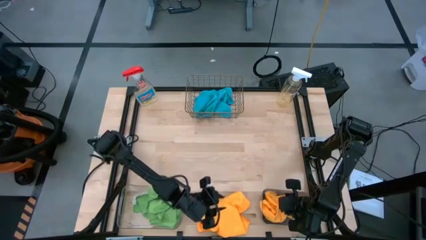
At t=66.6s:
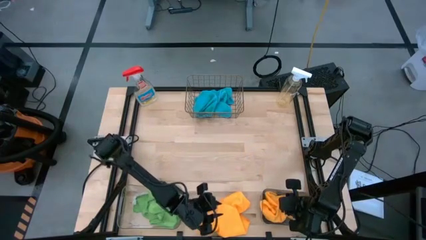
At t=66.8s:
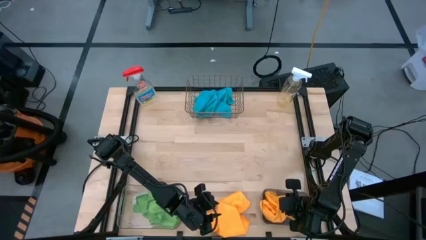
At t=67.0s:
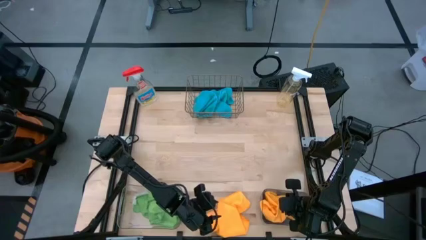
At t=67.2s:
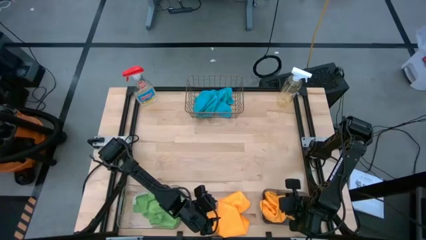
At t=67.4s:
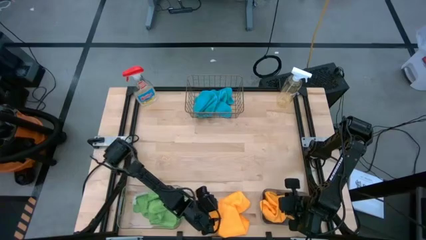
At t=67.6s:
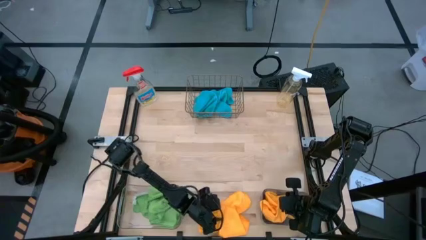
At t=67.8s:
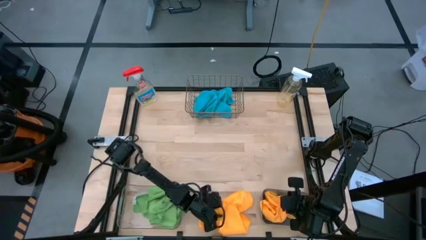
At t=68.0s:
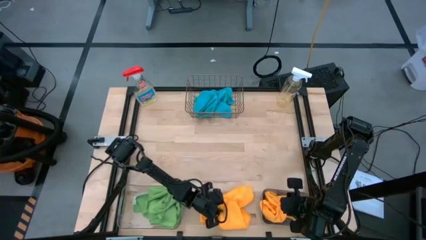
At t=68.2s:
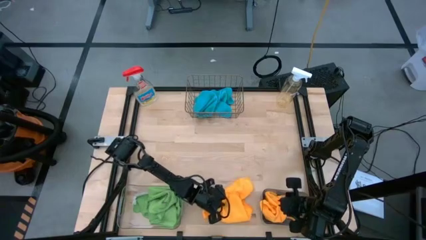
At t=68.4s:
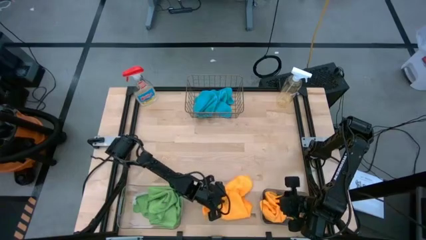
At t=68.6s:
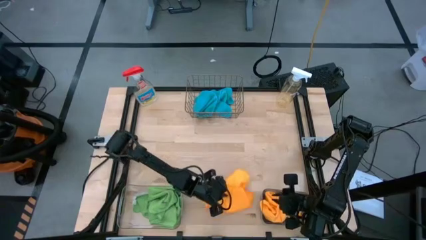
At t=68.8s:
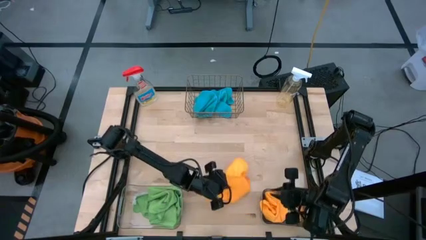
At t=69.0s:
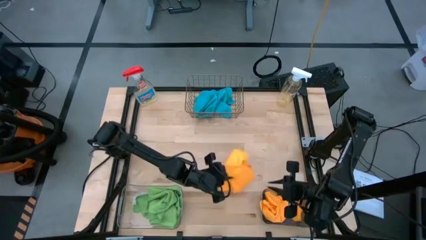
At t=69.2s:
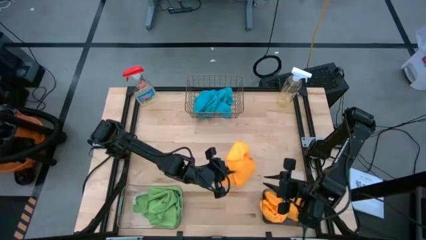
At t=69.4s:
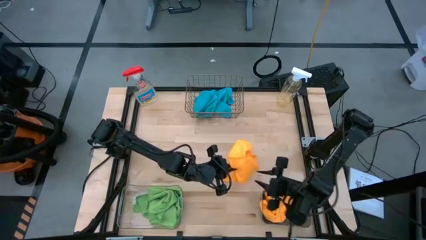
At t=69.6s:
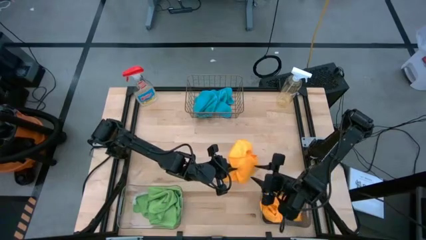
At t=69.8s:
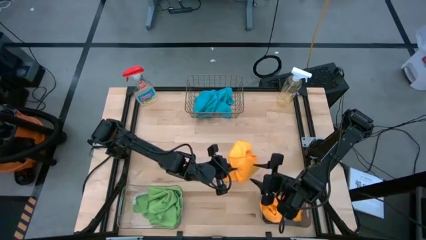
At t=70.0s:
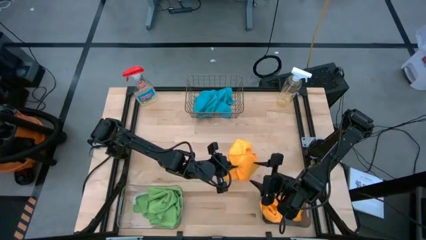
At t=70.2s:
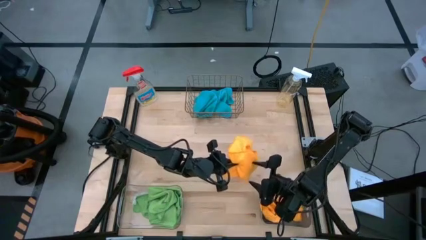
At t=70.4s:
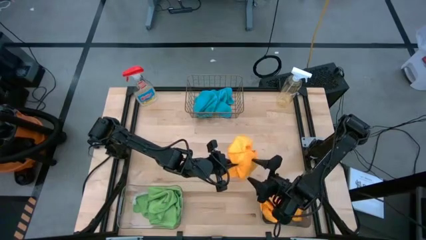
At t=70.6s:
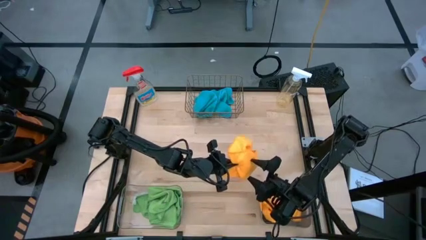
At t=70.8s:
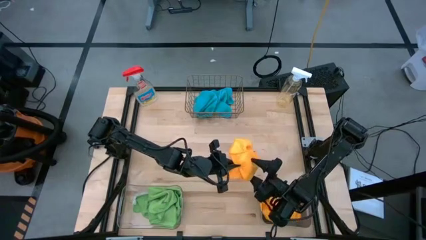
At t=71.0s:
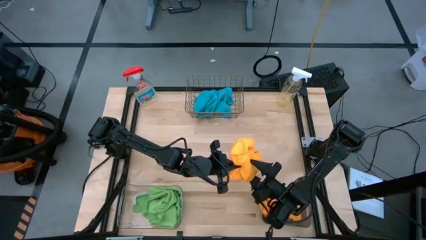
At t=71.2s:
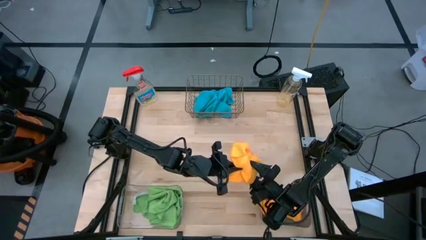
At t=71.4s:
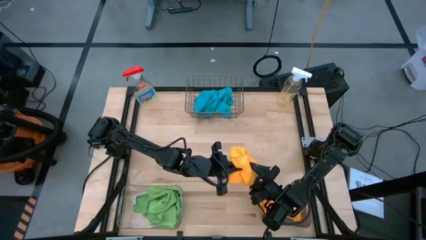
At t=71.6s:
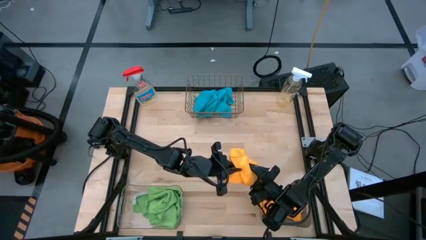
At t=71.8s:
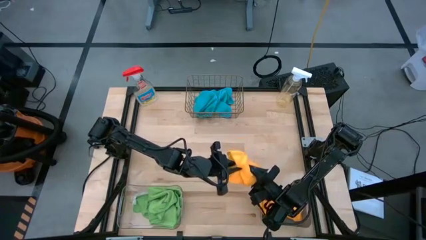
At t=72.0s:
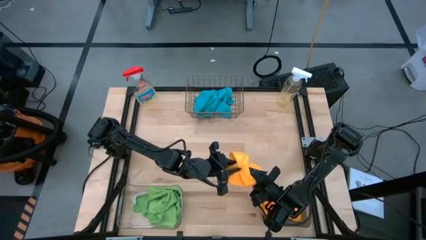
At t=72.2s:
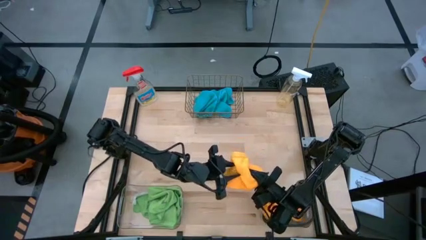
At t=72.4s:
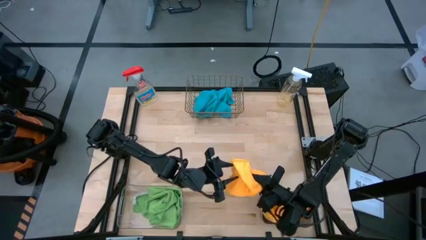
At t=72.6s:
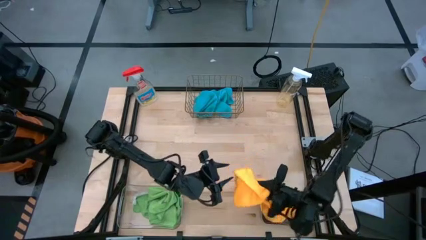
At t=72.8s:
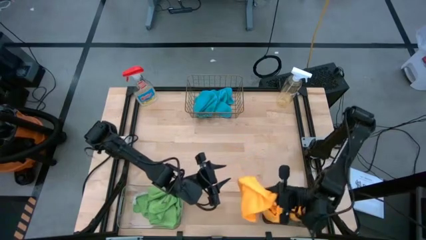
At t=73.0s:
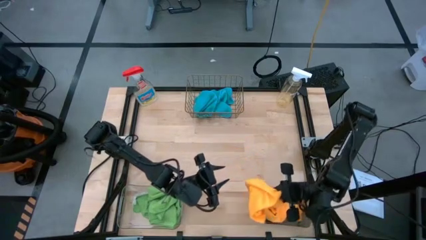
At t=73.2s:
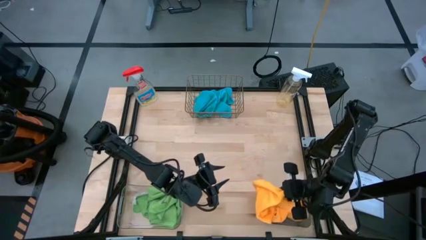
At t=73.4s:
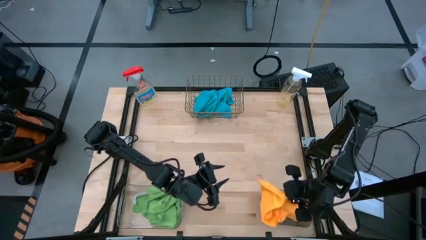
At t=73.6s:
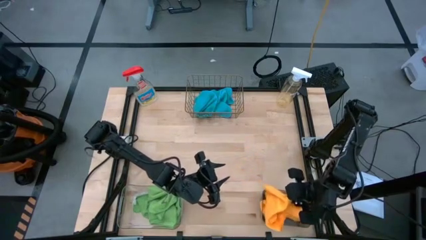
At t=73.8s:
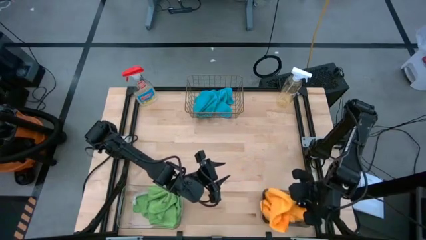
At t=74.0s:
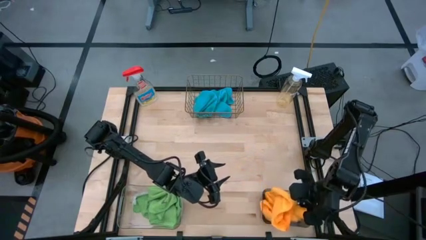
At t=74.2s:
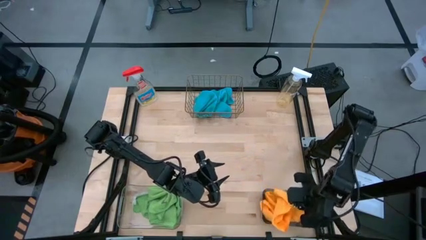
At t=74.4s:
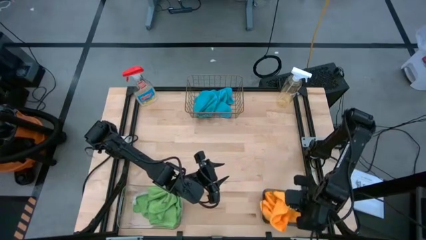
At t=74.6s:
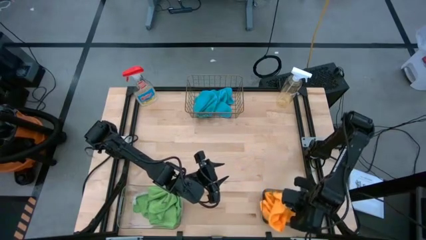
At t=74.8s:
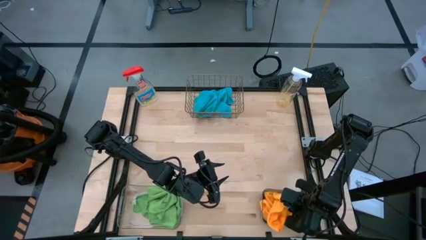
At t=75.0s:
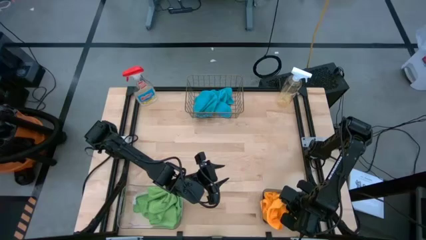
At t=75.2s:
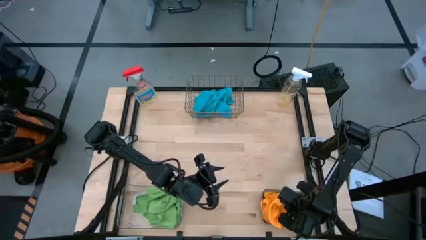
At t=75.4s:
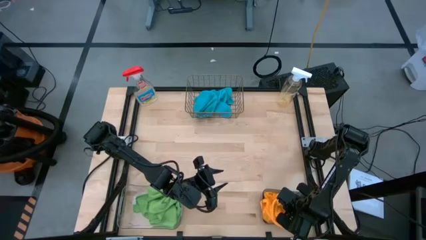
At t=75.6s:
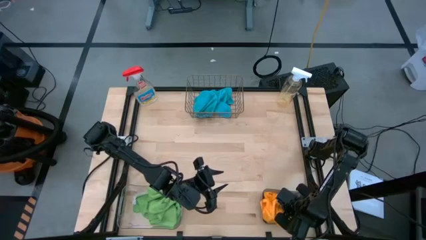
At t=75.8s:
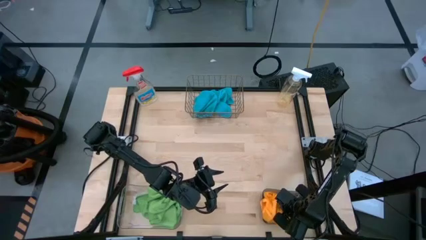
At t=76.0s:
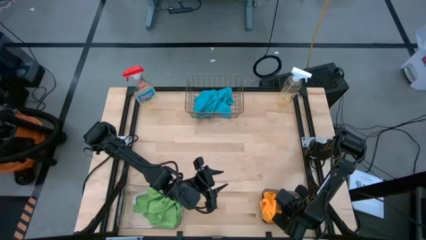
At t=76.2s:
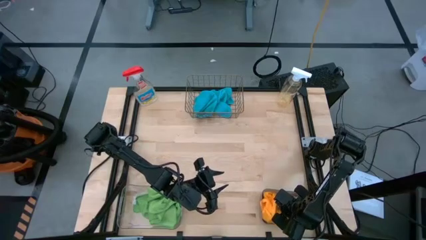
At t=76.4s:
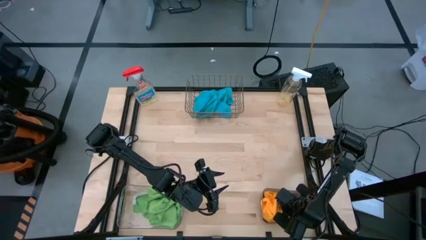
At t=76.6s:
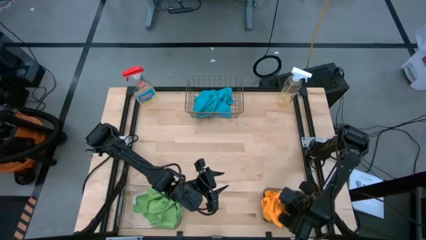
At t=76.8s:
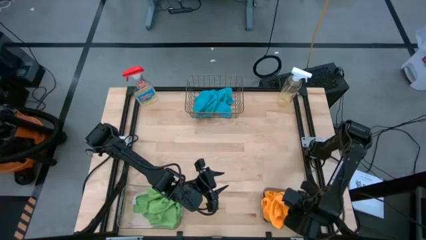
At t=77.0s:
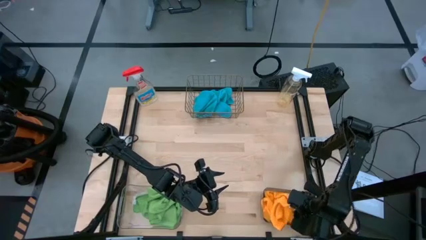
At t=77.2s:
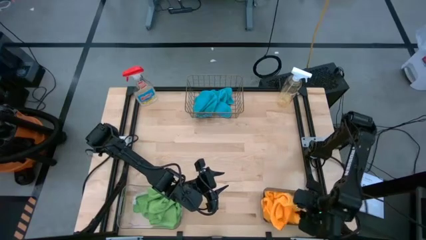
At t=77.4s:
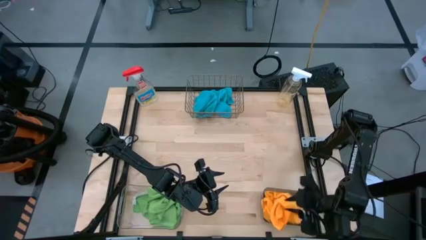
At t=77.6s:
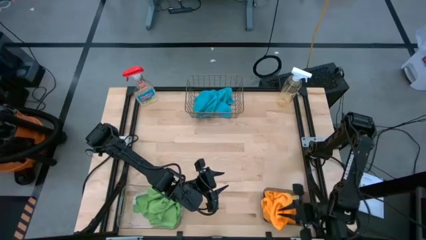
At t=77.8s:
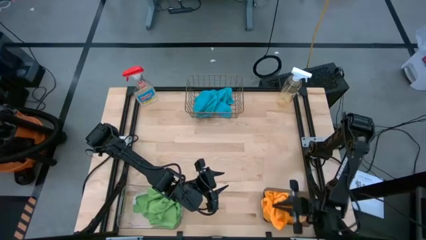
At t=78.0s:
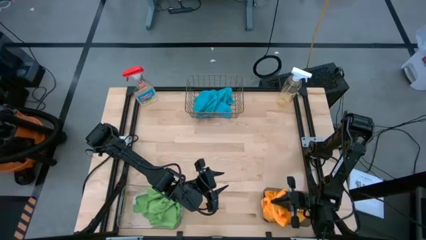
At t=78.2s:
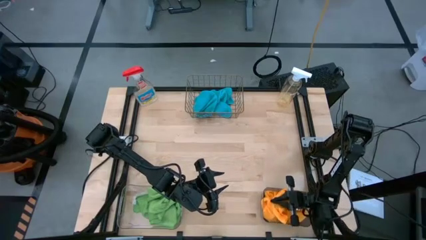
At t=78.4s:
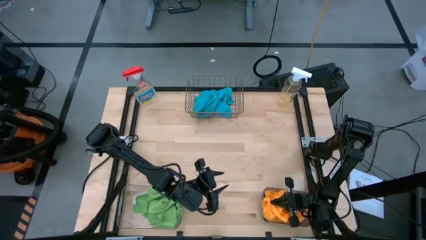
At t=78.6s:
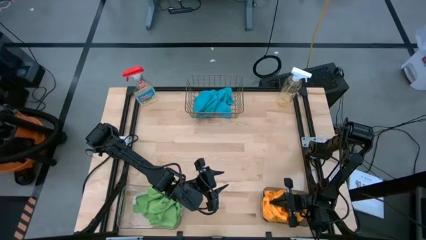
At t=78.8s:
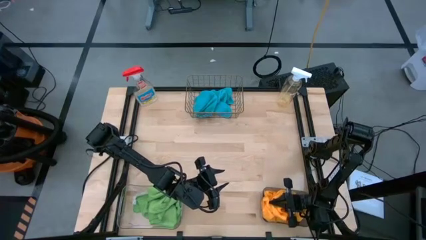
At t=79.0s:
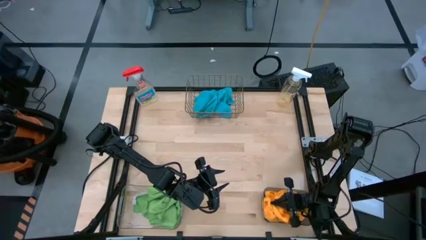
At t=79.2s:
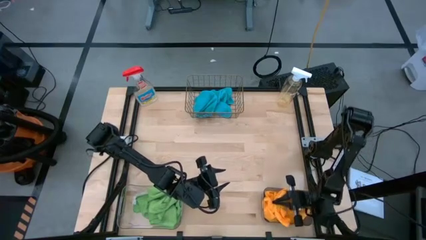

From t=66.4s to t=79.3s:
Task: Sort microfiber towel by color & place in baskets
Put the yellow microfiber cloth into the black bin
